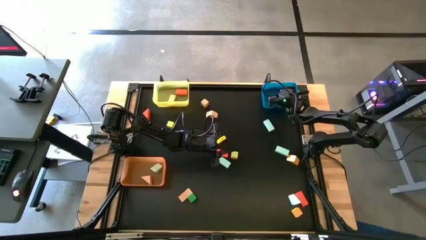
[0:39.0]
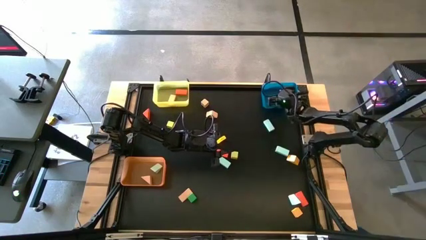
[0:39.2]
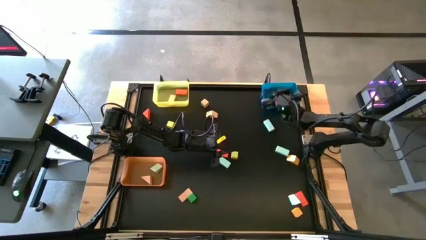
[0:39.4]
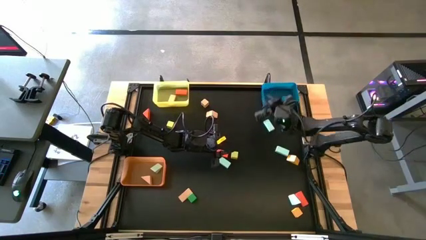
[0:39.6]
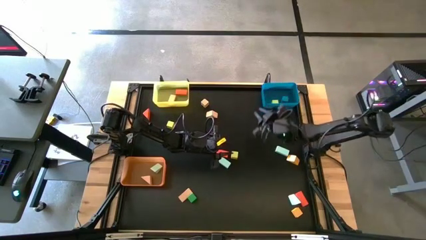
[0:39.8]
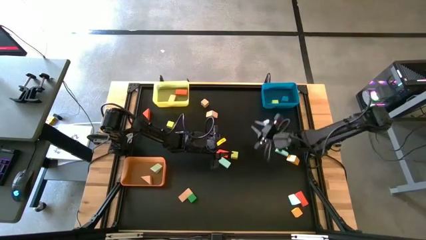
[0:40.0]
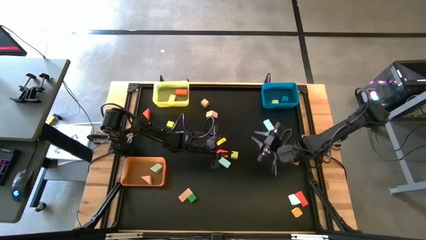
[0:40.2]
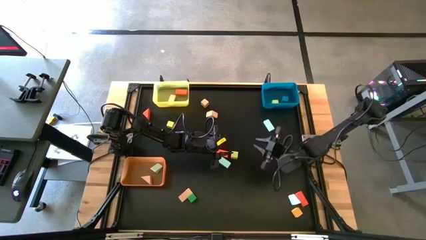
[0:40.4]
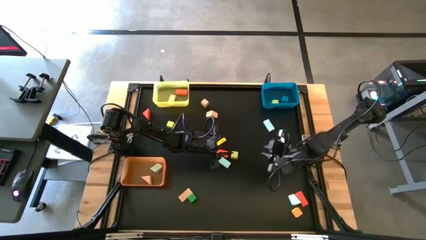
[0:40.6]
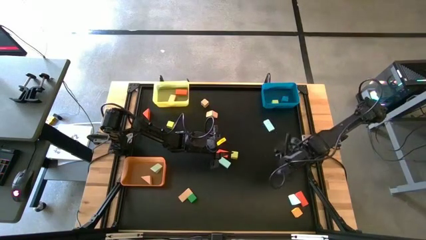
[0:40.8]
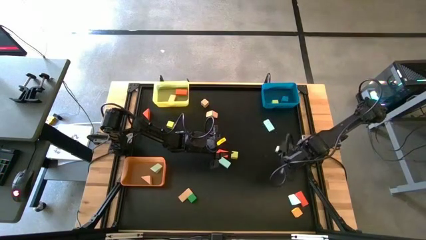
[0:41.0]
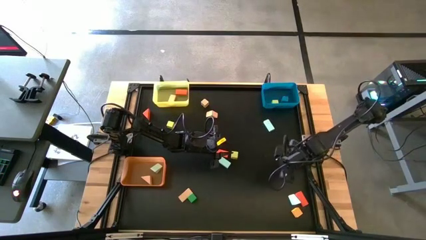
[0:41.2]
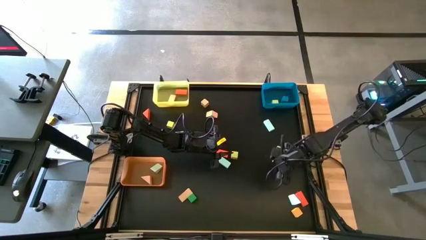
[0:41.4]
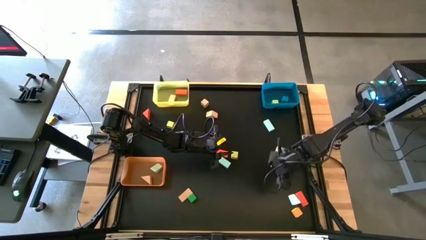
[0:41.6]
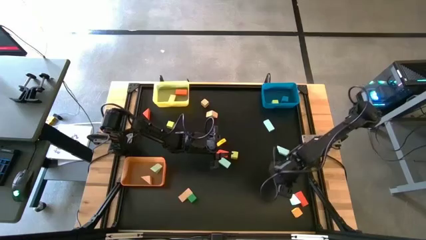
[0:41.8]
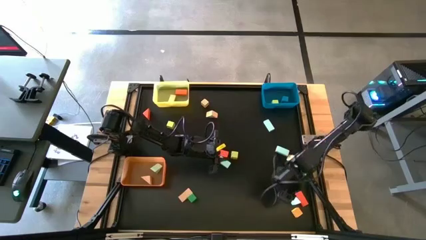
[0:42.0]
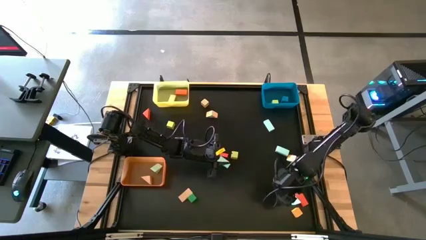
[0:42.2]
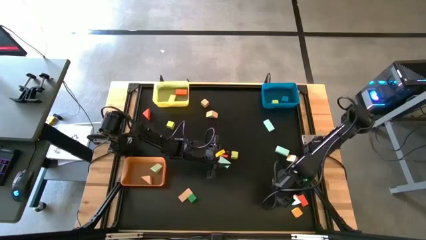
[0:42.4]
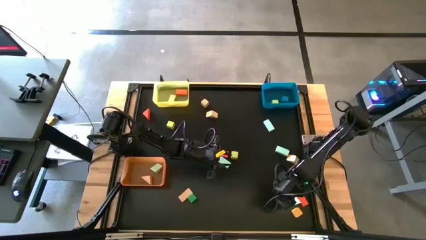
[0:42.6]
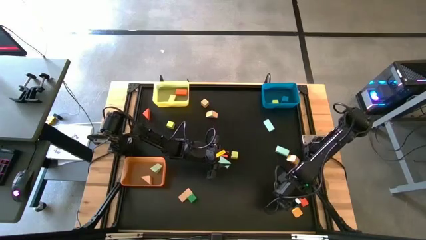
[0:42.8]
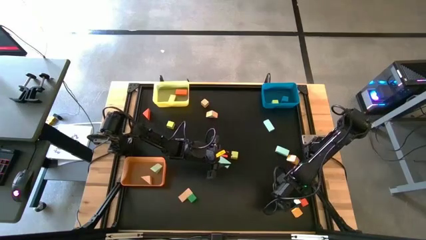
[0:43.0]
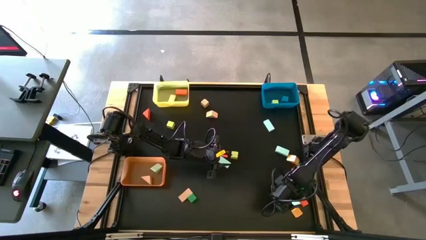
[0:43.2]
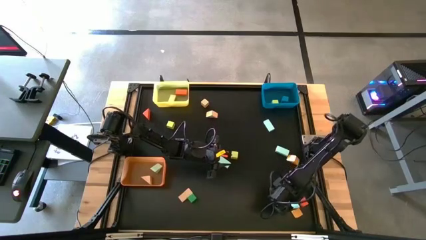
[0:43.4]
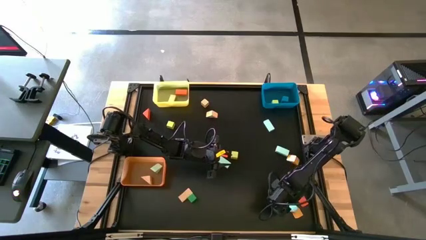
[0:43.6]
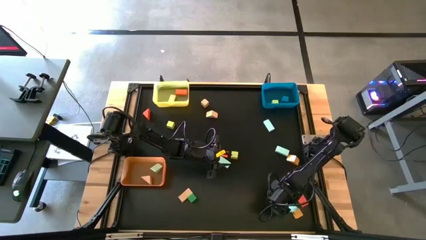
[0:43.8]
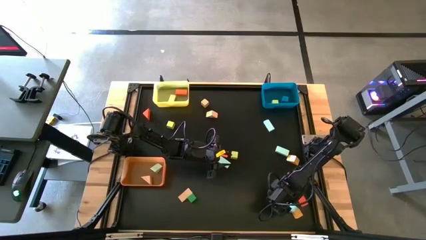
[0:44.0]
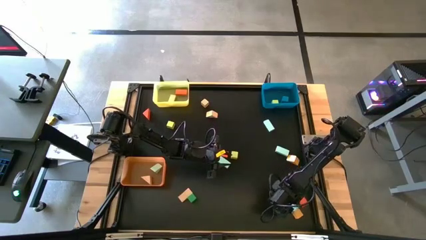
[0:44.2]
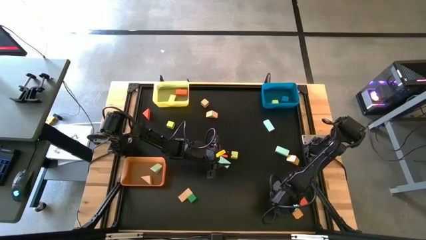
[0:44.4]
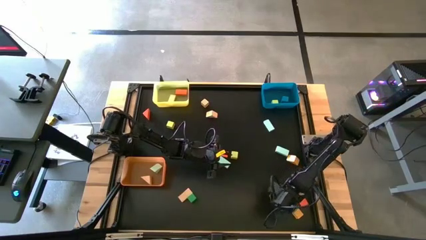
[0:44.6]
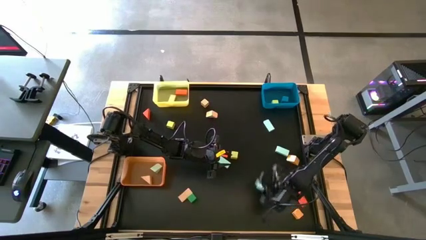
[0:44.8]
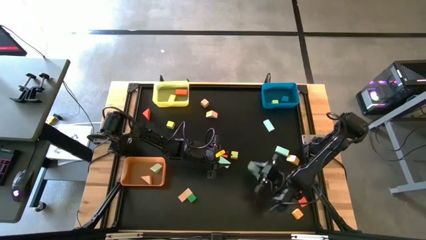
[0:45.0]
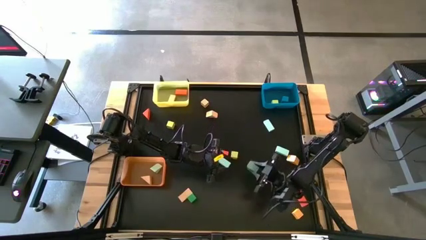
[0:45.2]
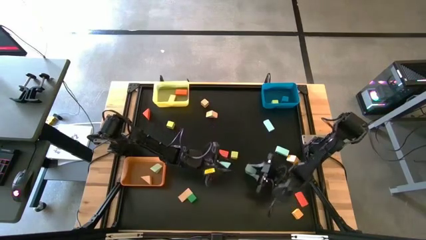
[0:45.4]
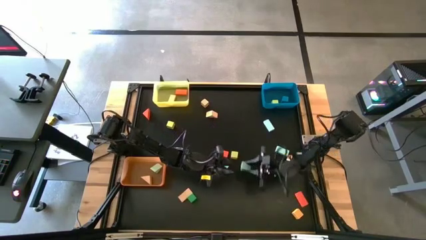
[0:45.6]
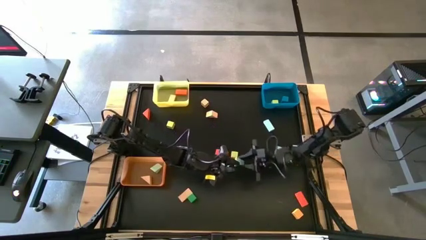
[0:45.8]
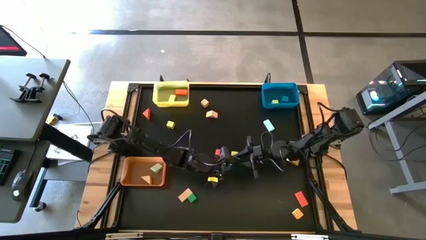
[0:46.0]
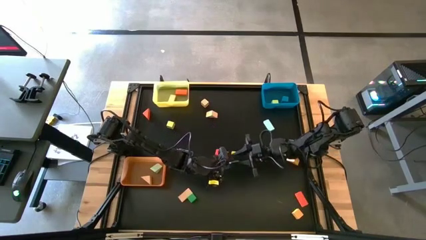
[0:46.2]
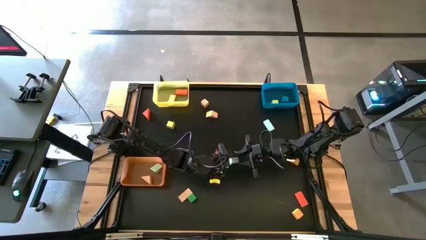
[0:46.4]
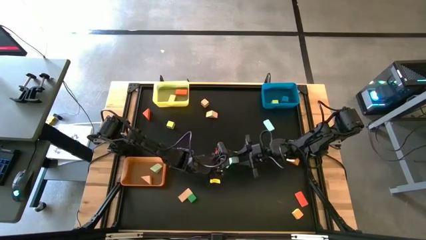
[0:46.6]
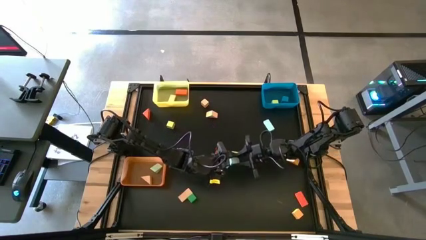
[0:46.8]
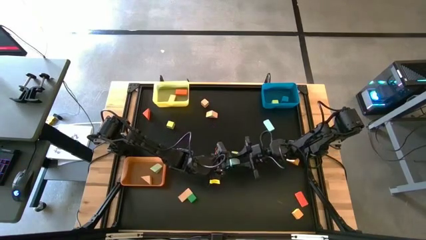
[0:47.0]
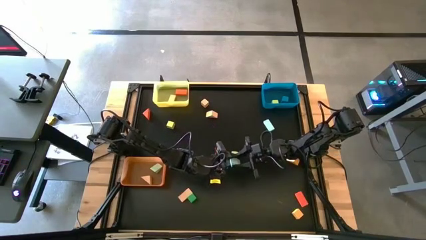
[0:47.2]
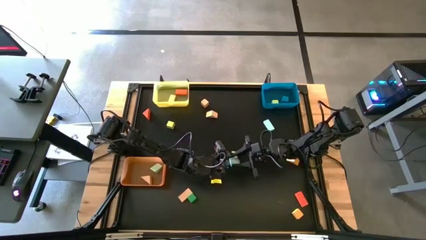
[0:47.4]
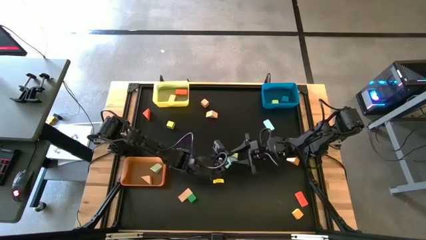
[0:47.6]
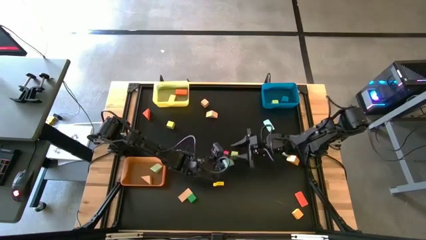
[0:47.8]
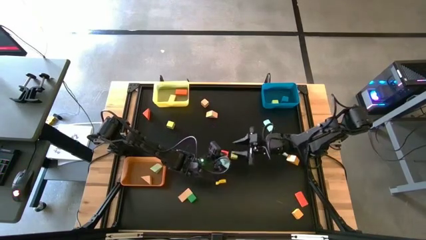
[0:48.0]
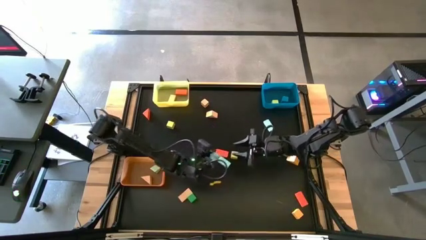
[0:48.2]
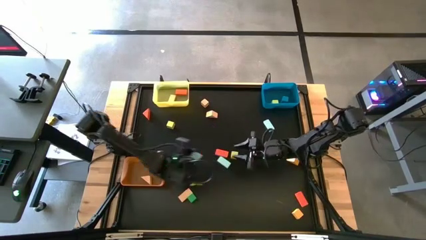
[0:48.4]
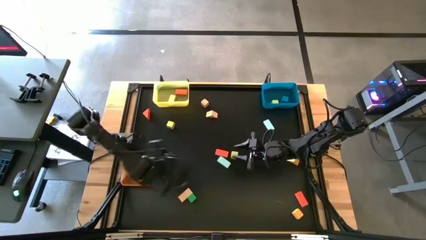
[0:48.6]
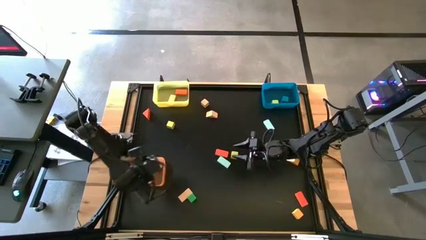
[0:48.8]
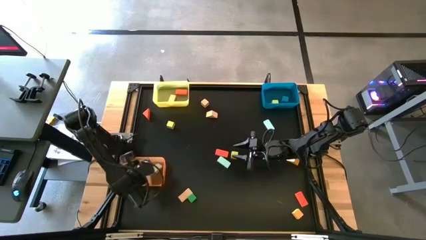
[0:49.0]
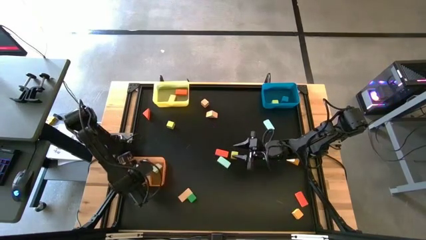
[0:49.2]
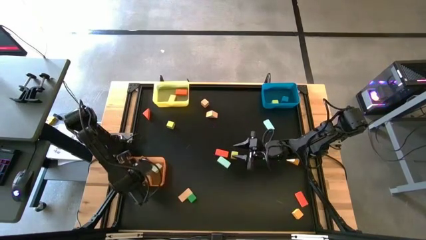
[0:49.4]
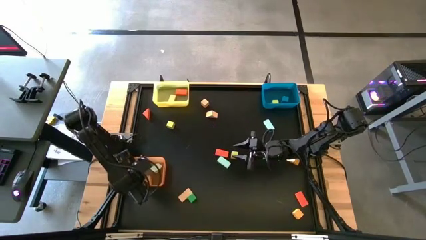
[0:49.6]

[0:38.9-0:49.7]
Task: Sort blocks by size
Put the light green wooden block into the orange bin
